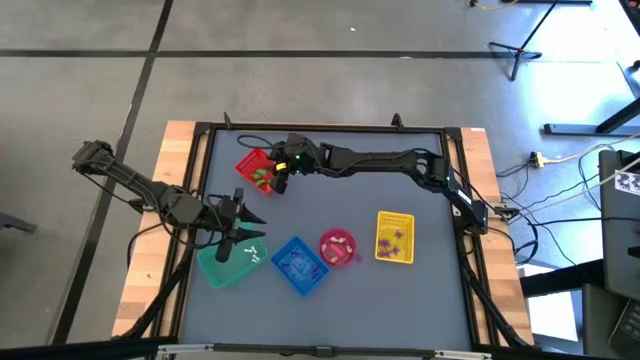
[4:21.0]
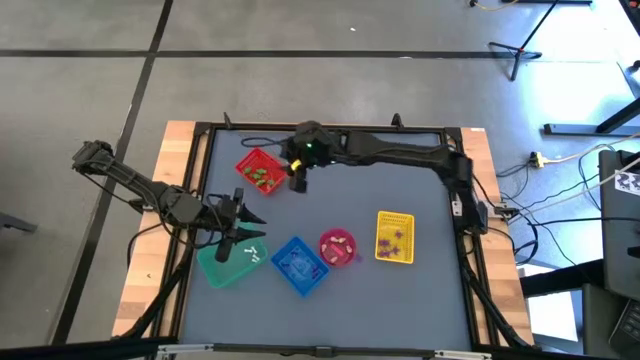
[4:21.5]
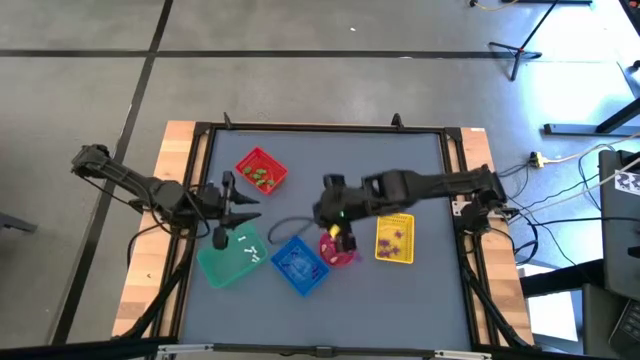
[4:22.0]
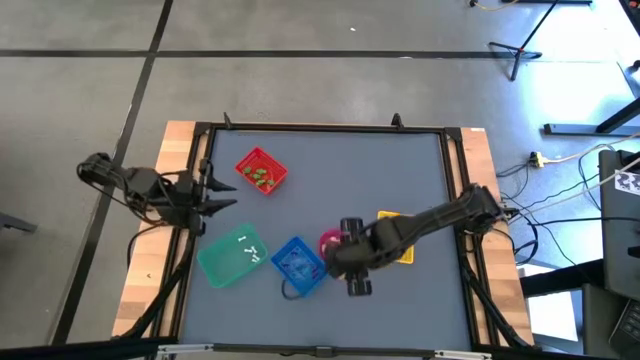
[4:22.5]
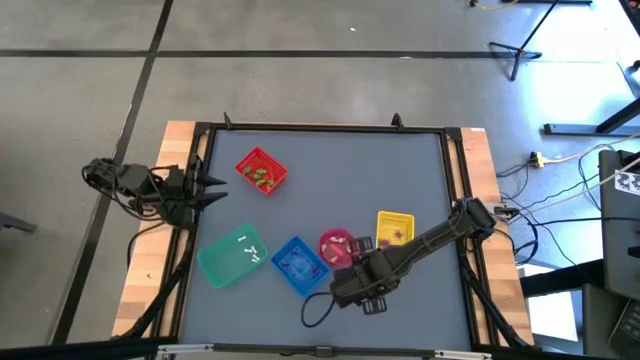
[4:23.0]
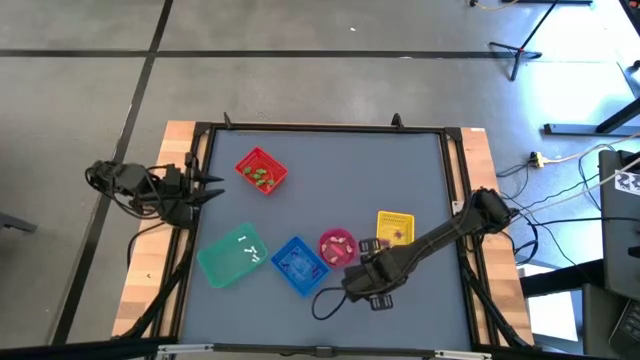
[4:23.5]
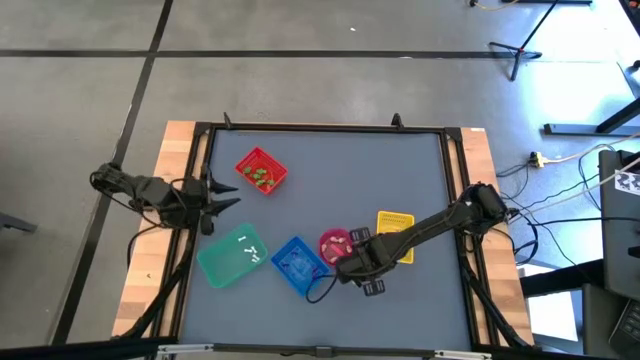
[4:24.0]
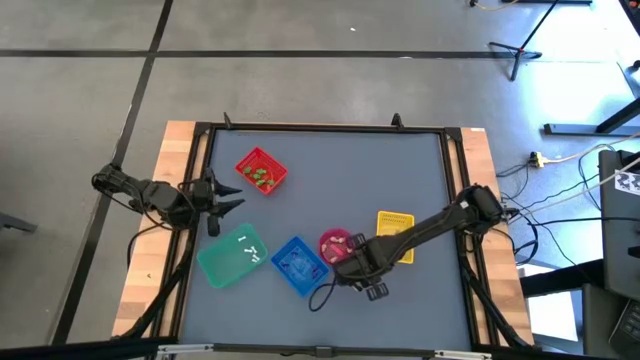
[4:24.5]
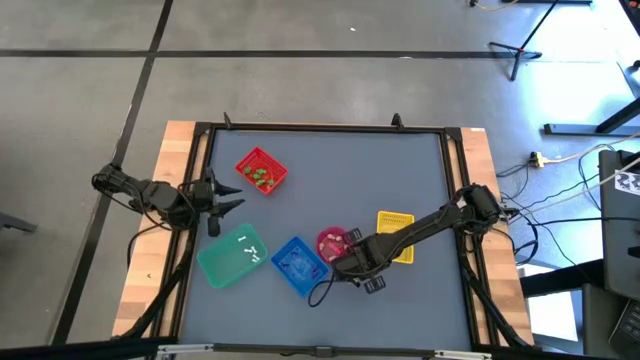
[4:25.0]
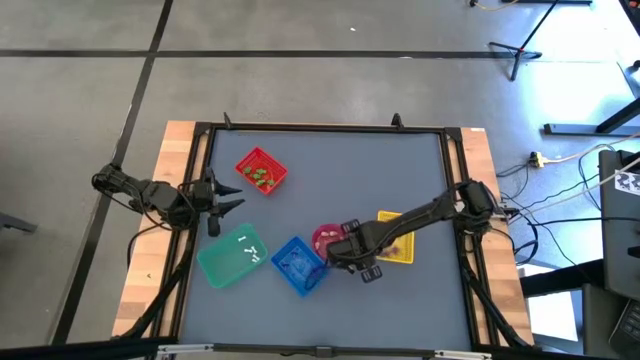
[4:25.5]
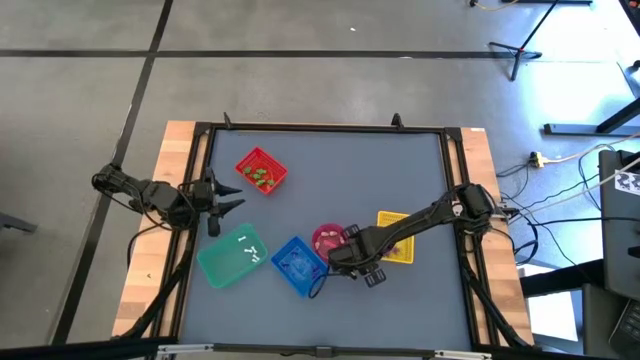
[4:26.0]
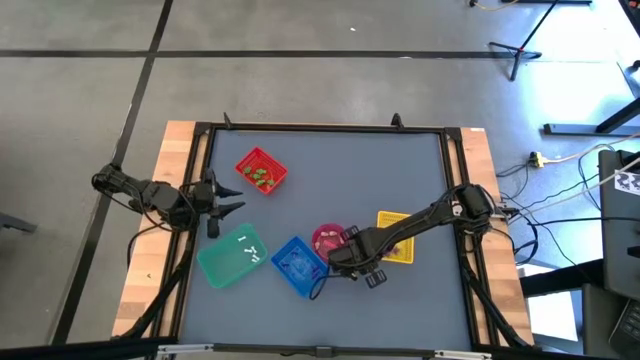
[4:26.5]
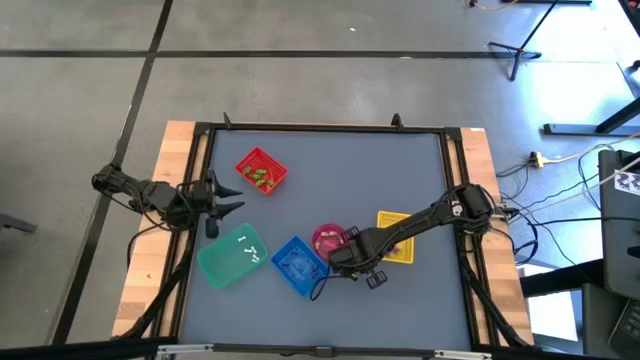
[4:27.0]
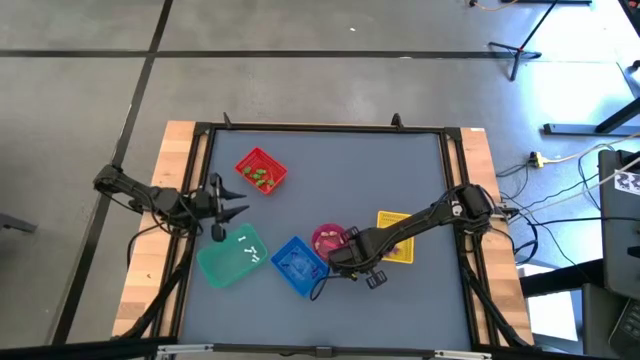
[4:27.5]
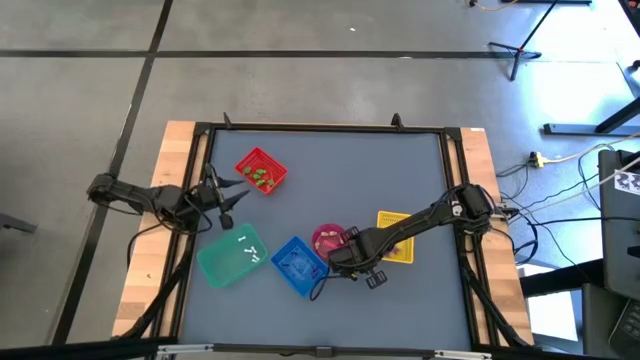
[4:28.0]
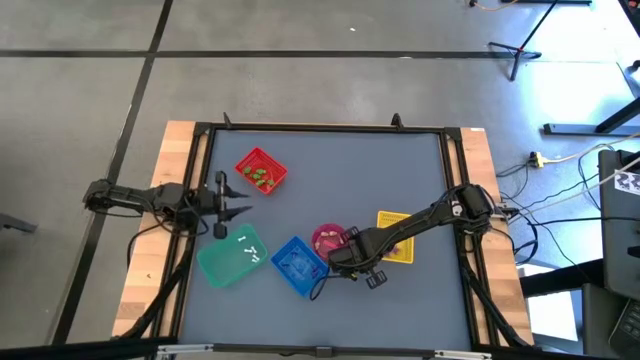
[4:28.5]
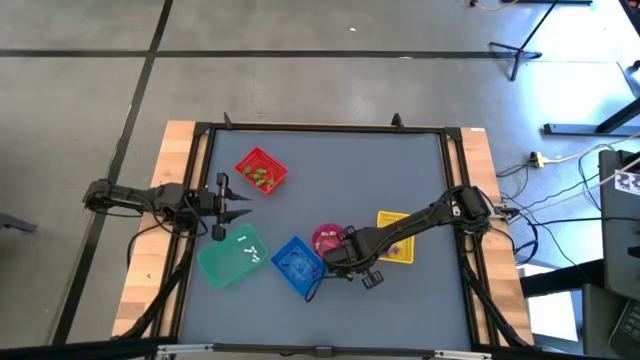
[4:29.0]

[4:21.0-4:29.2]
Task: Sort Halloween decoration
Put the purple spider toy into the yellow bin

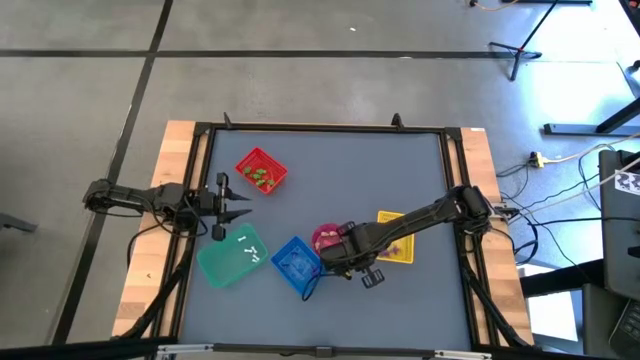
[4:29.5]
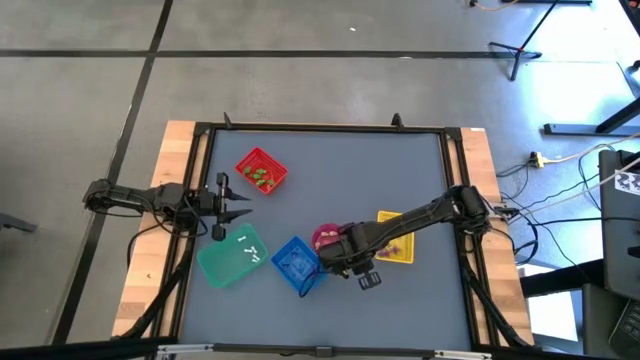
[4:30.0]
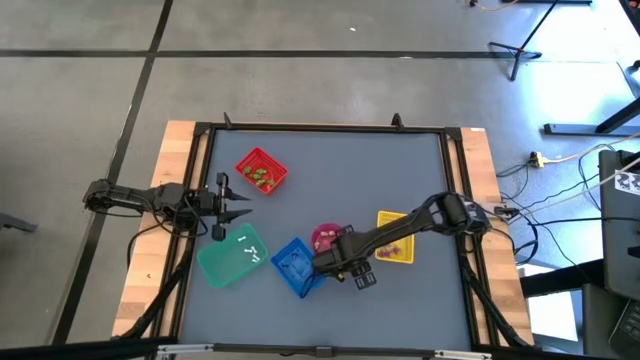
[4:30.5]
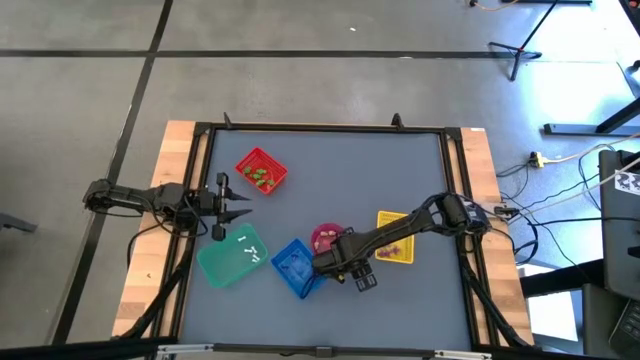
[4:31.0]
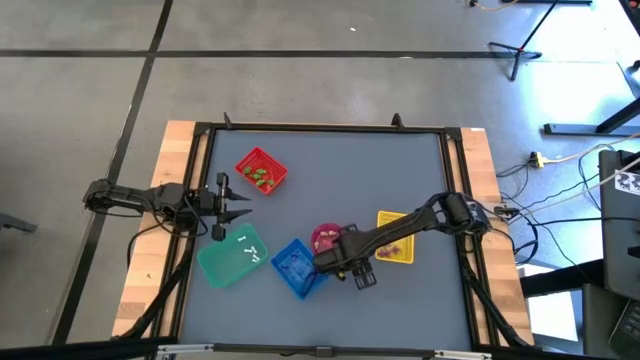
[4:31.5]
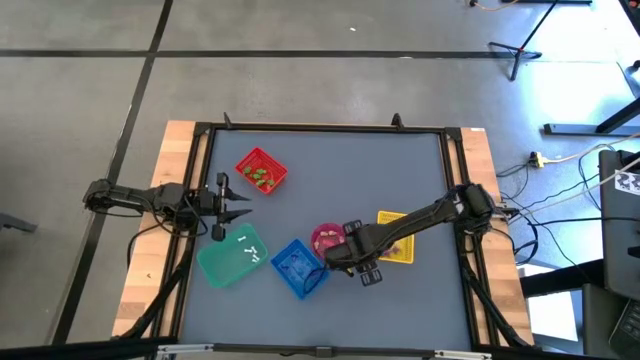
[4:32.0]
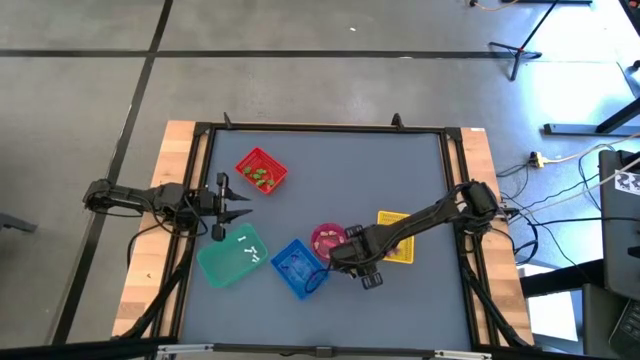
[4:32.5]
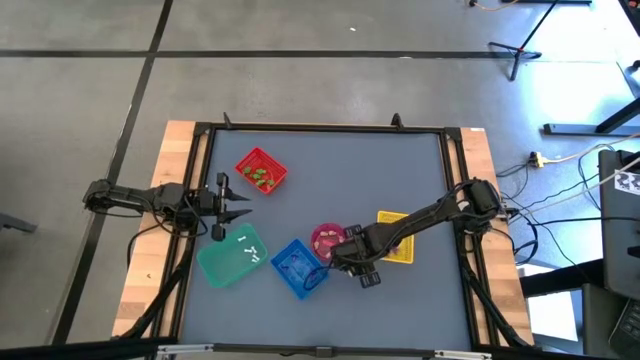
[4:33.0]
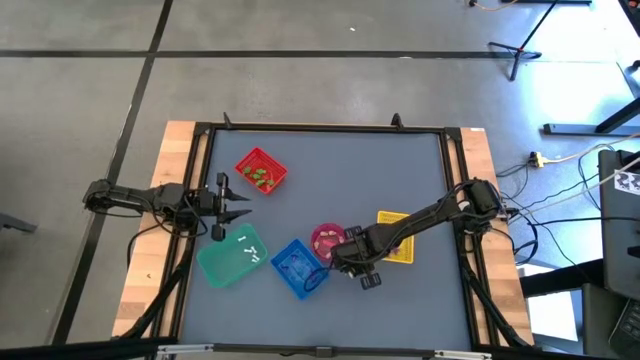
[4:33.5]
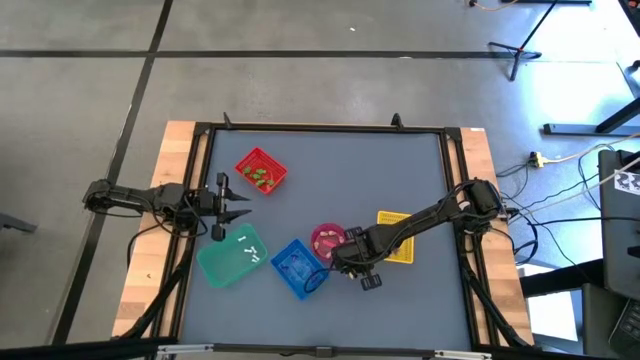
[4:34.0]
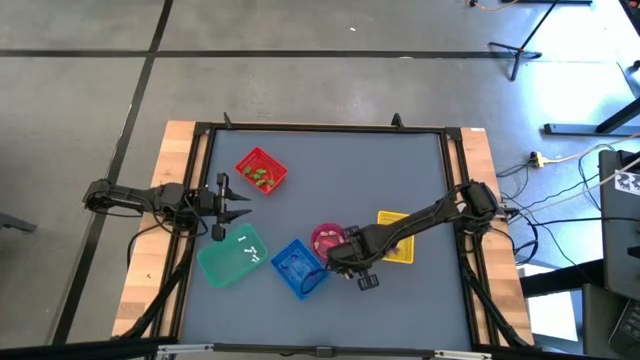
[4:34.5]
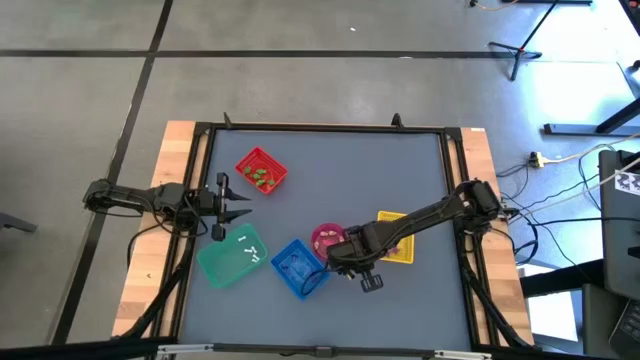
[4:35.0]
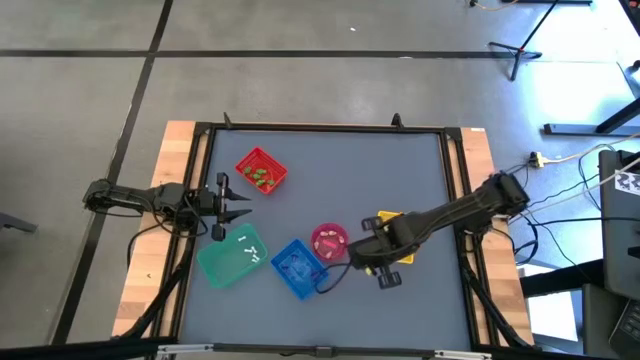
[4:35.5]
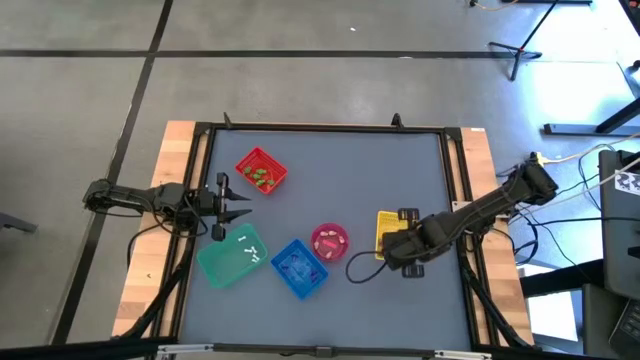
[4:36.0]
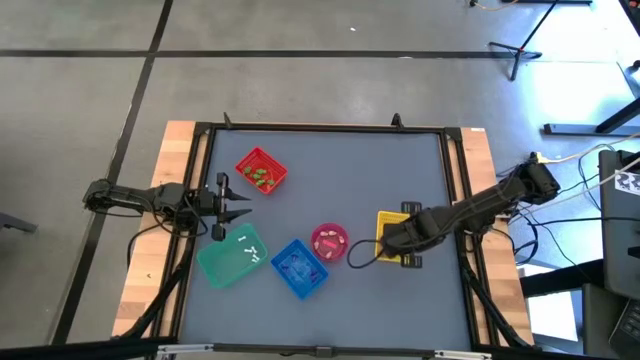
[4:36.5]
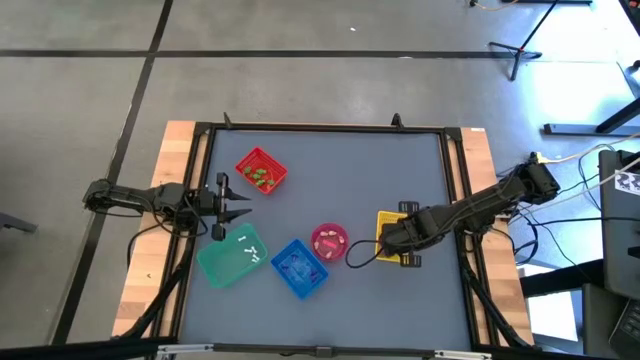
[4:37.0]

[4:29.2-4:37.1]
Put the purple spider toy into the yellow bin

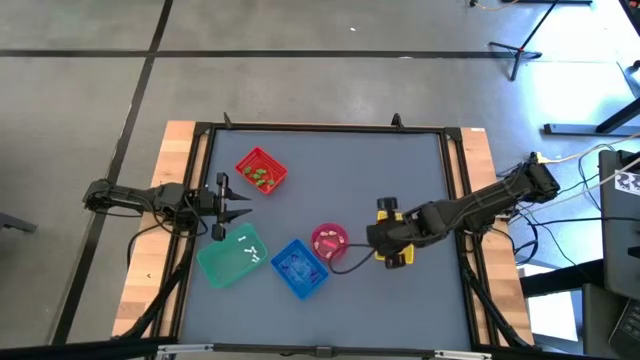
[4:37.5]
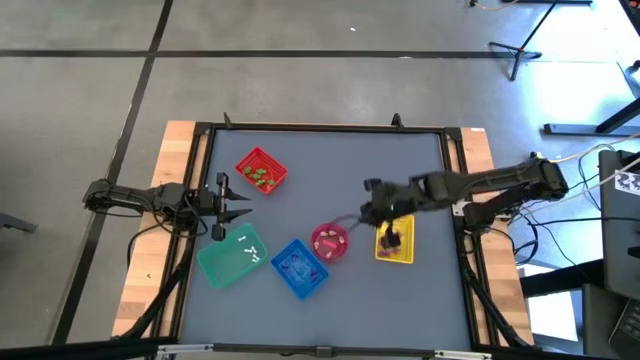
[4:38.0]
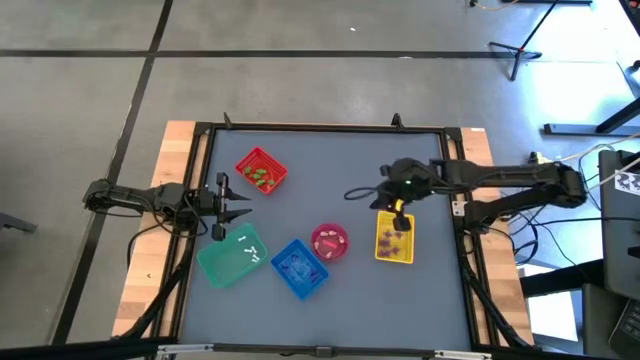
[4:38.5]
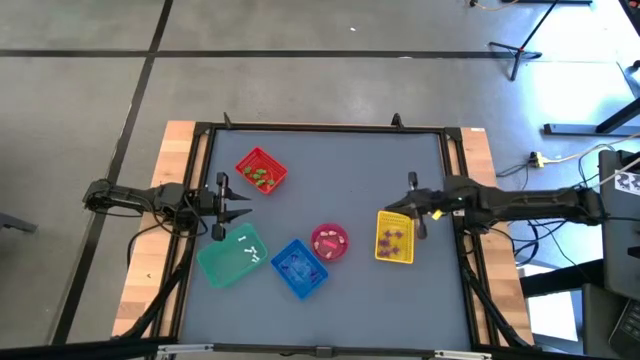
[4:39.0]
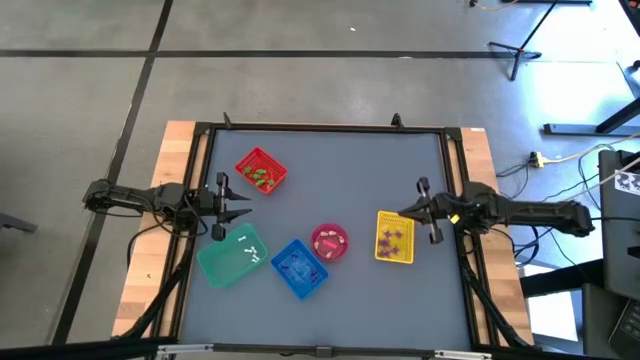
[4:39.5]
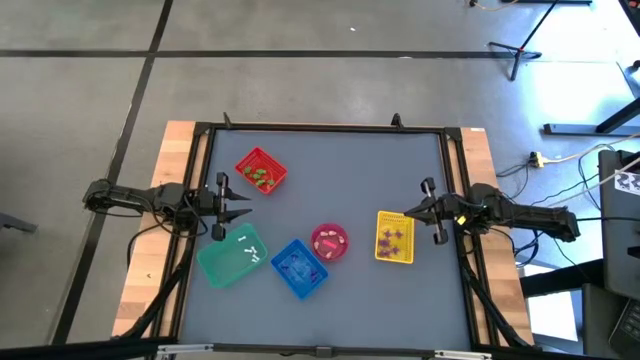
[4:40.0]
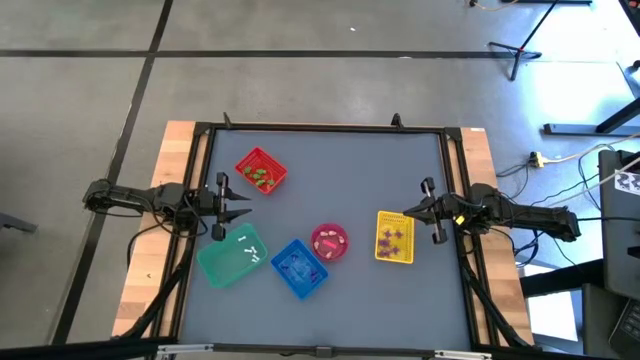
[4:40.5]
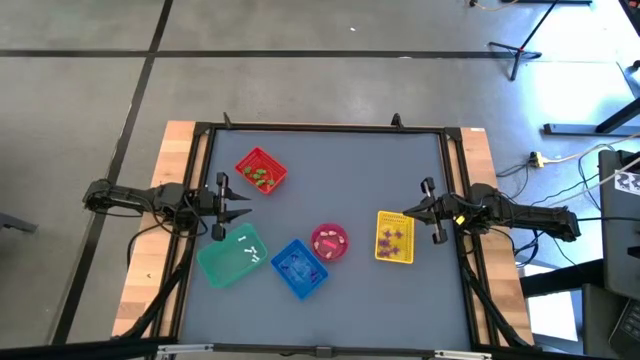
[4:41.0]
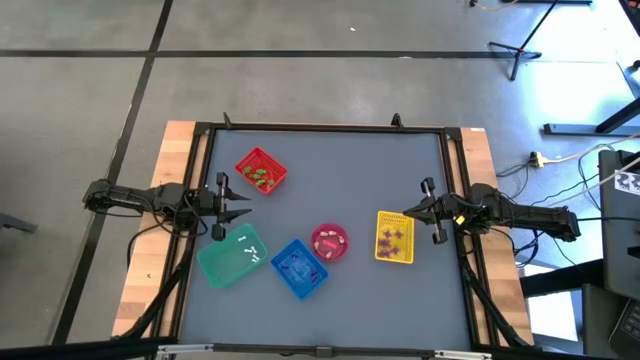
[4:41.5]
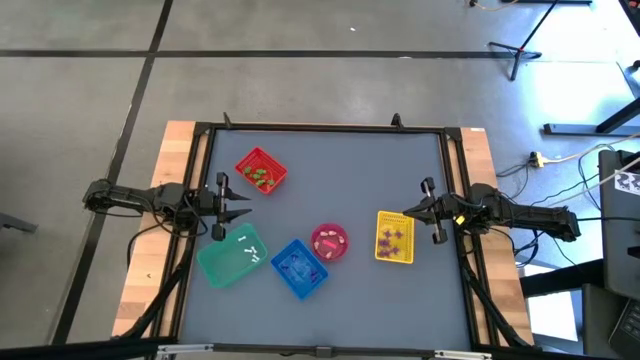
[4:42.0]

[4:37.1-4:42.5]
Return to Home Position
